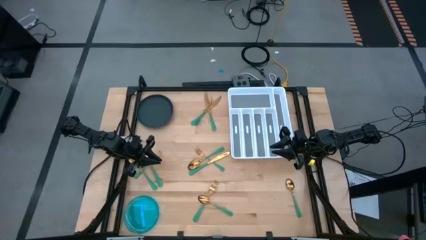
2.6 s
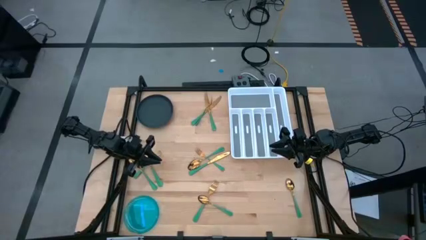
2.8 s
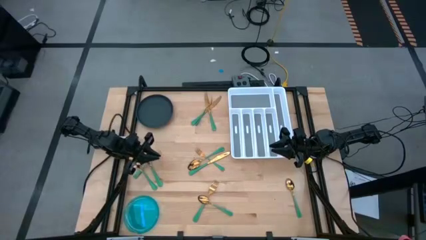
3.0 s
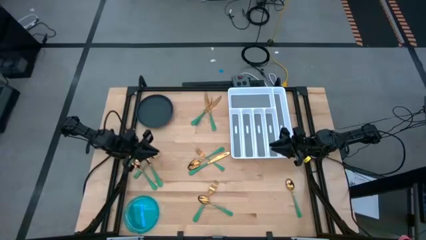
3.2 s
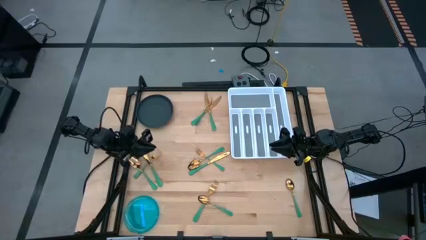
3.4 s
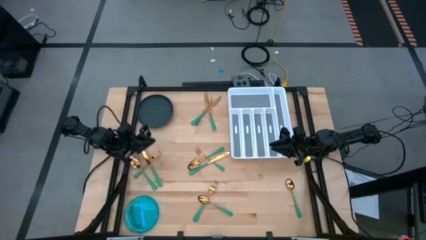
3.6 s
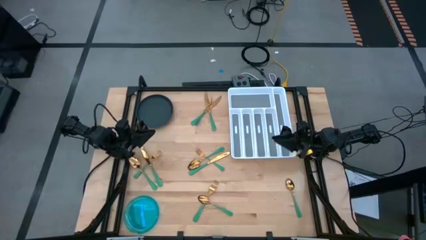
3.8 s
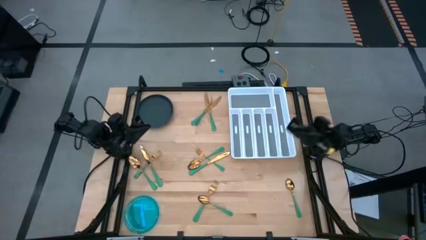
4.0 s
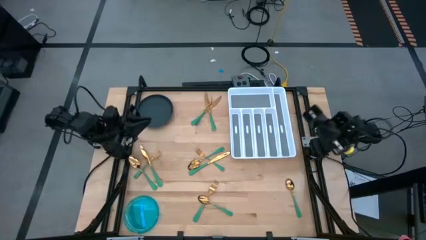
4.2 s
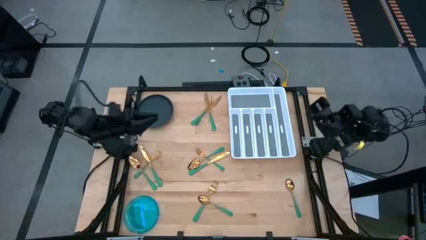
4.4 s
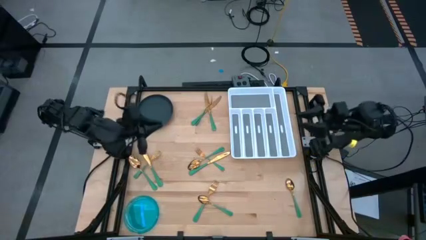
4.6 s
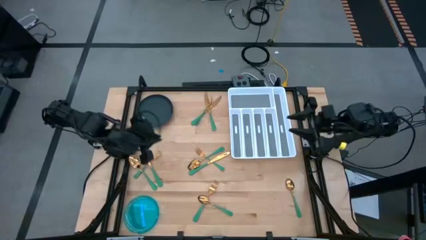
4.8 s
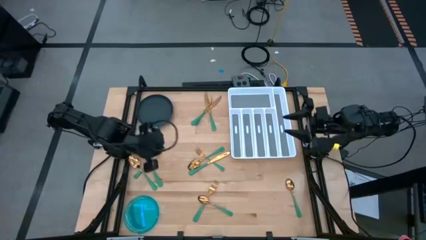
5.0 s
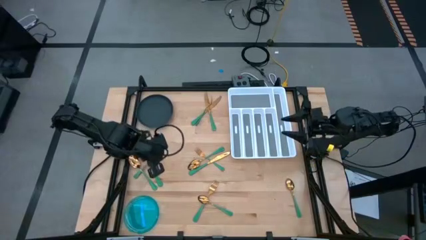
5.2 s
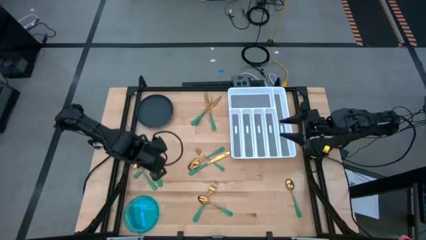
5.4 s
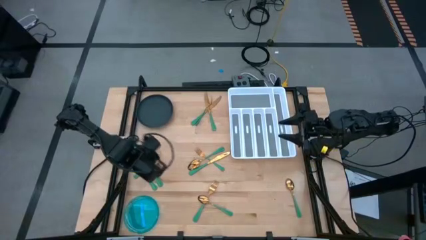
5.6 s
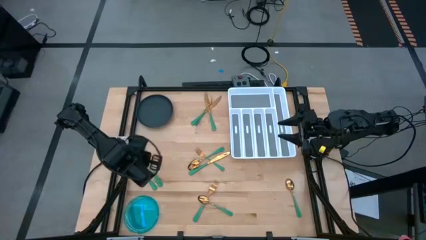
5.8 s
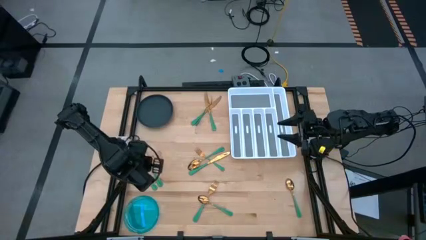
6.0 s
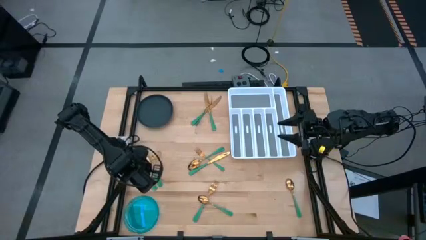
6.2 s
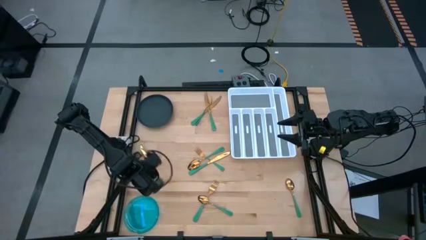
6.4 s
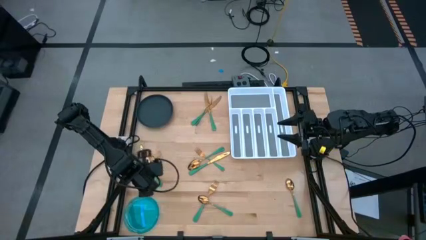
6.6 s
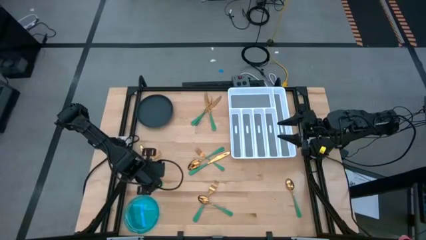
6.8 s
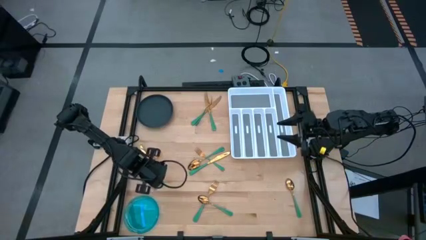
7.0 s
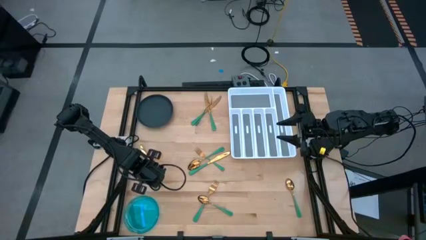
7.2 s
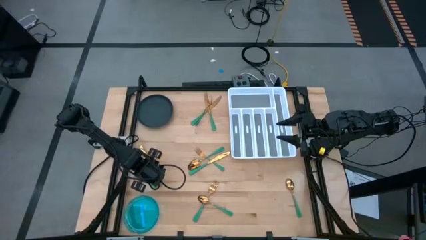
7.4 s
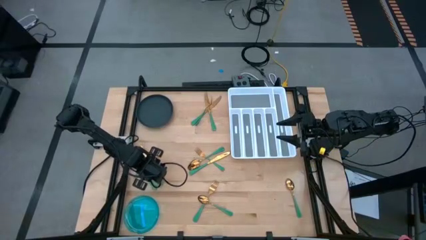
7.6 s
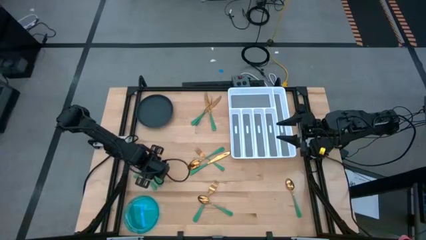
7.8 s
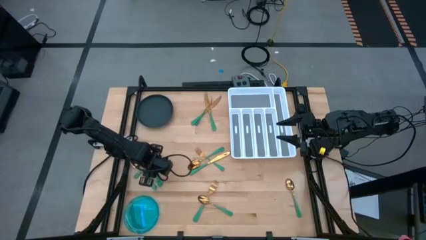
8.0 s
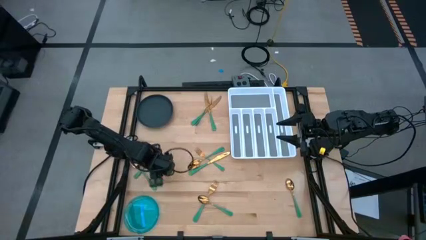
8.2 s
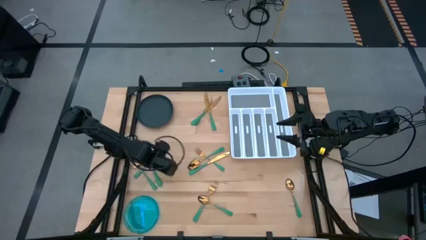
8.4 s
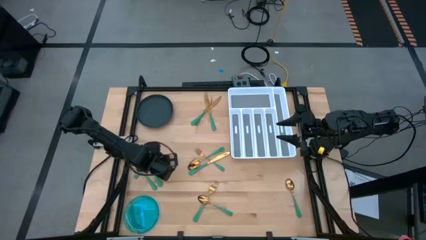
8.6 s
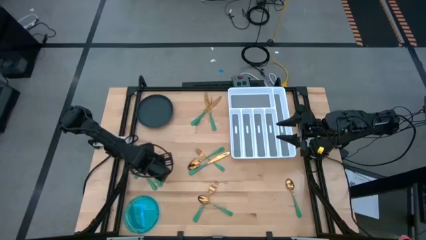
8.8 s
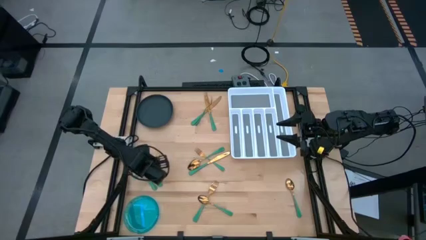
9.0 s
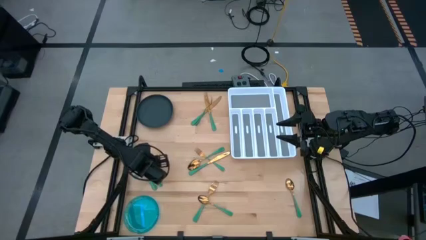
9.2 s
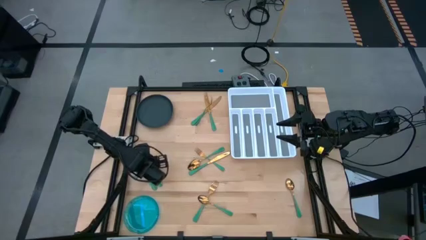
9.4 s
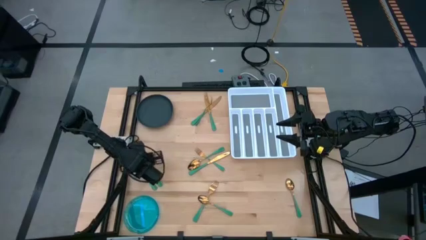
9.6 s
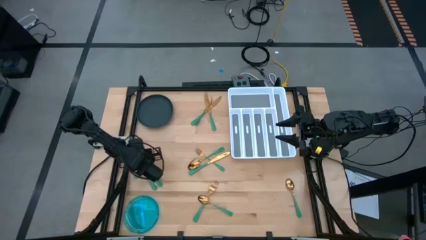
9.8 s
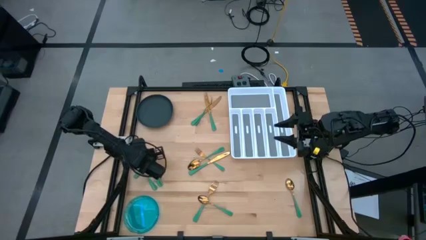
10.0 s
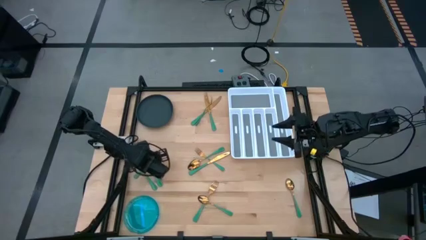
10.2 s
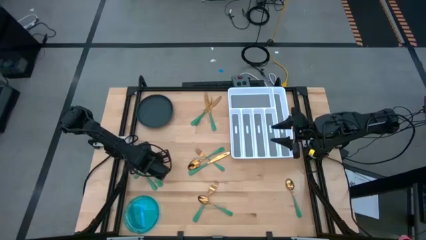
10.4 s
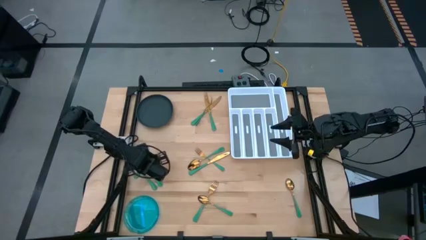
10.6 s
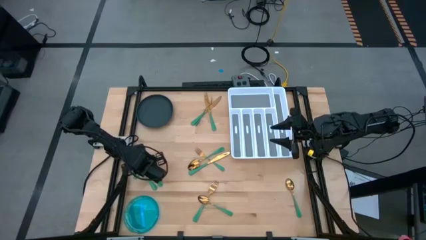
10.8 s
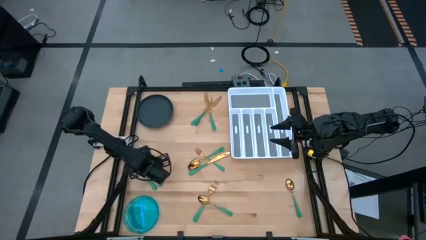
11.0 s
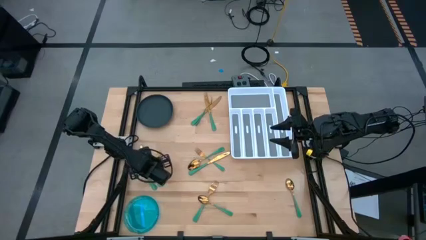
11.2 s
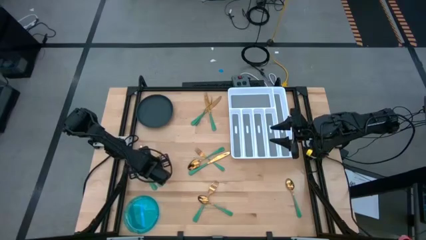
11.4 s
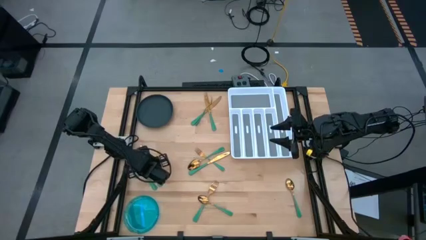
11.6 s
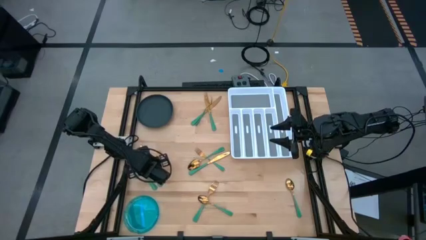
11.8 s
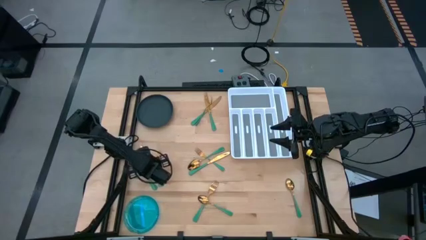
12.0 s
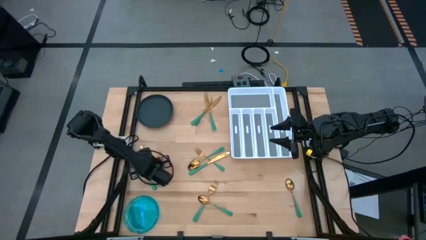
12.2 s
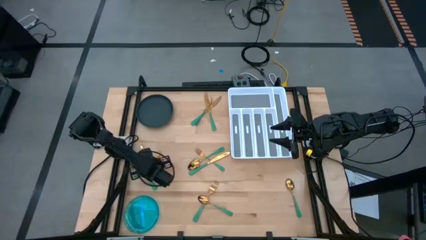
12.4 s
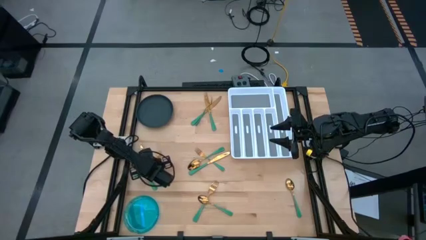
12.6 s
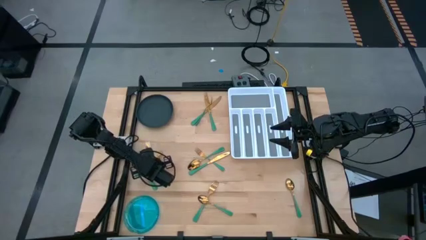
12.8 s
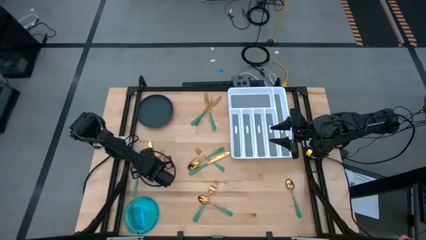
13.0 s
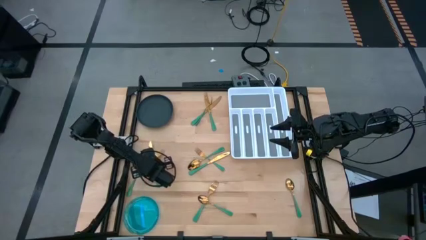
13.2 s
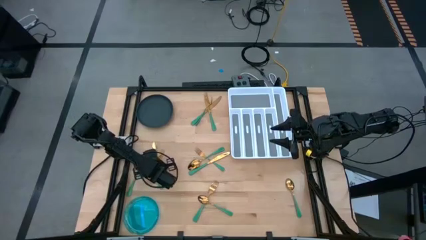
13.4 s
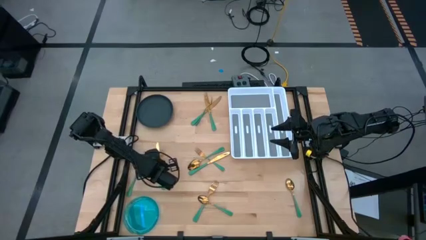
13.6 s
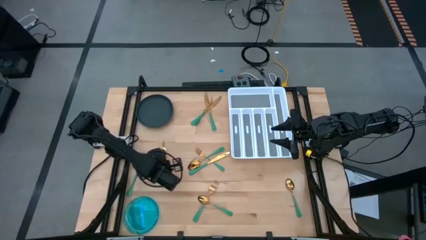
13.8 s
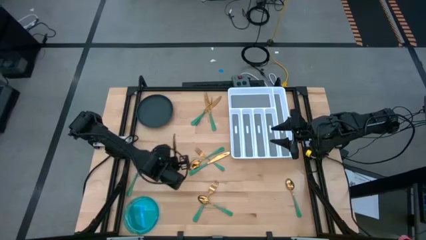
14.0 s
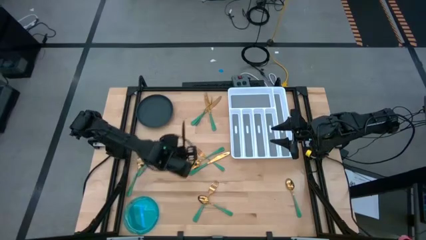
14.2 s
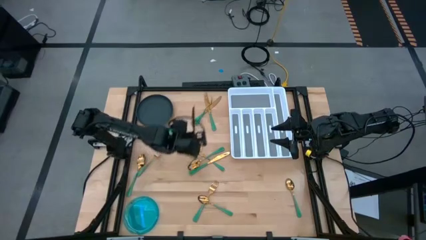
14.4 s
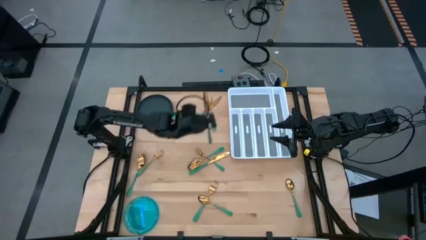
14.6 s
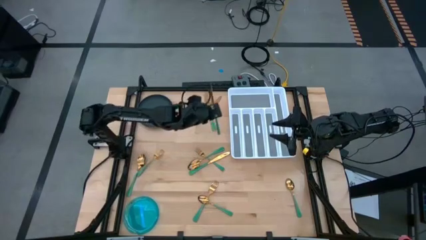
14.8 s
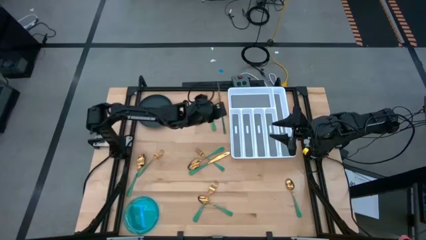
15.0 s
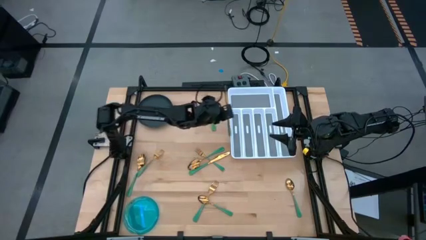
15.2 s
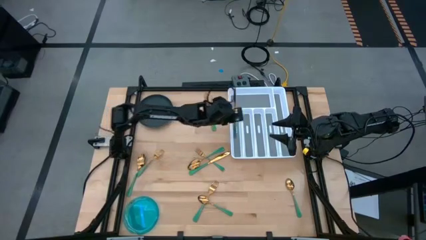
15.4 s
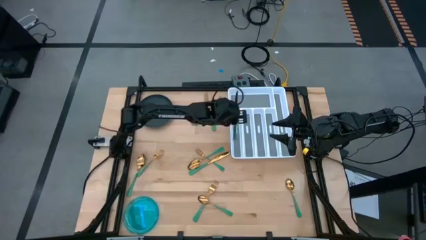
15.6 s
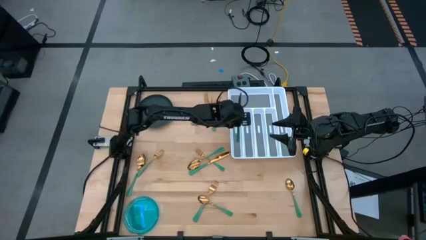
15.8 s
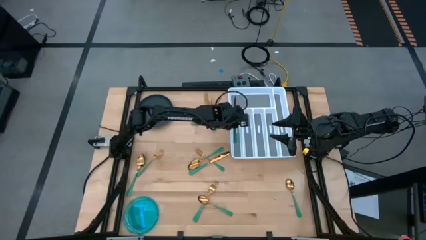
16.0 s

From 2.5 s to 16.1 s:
Task: Sort silverware
Put the green knife on the silverware organizer

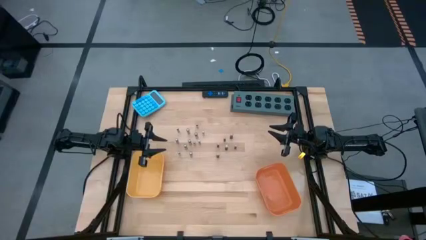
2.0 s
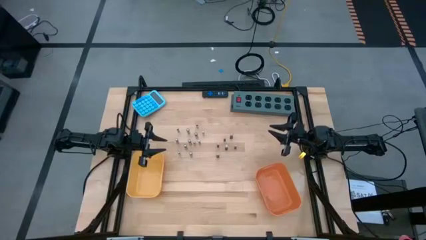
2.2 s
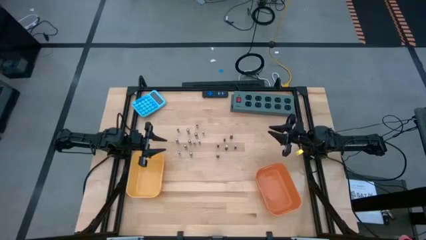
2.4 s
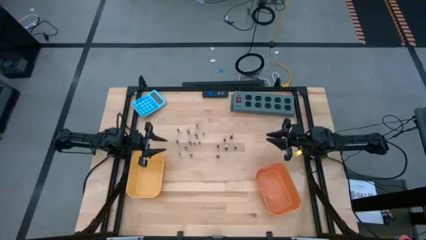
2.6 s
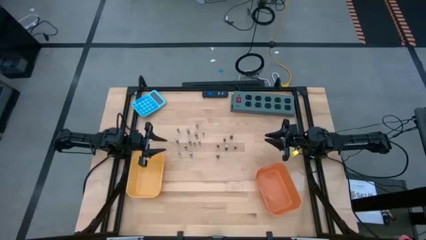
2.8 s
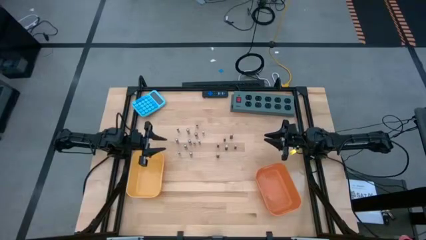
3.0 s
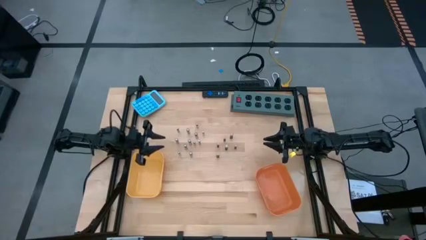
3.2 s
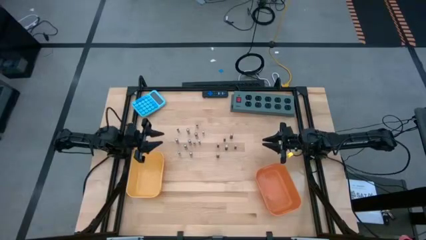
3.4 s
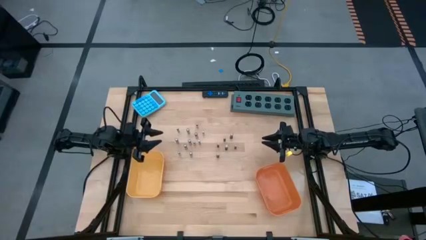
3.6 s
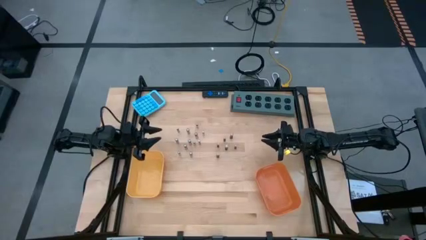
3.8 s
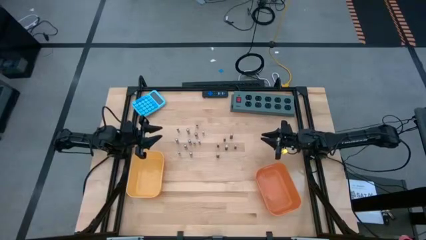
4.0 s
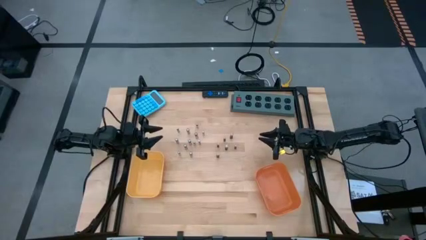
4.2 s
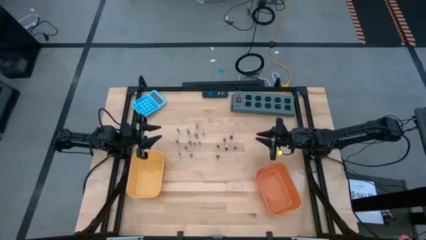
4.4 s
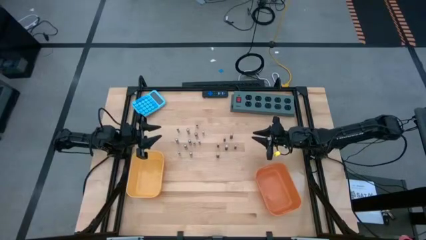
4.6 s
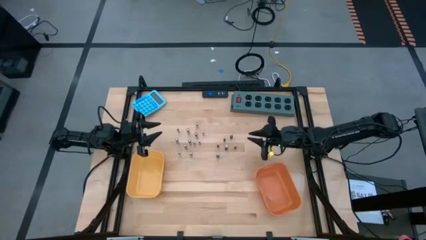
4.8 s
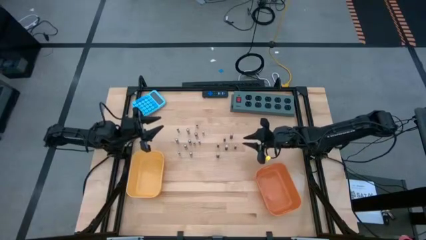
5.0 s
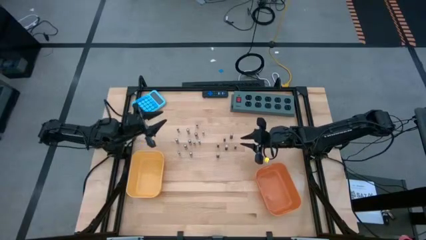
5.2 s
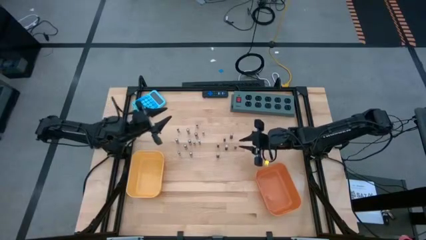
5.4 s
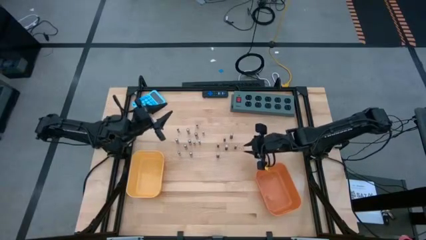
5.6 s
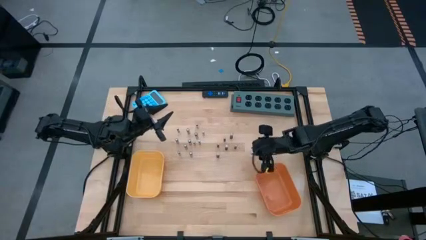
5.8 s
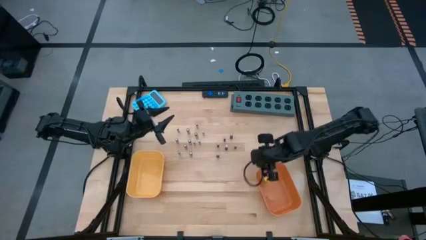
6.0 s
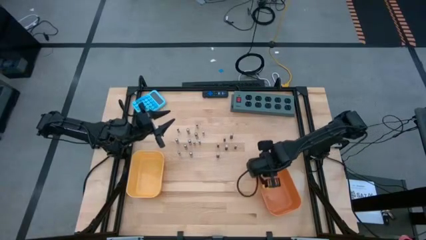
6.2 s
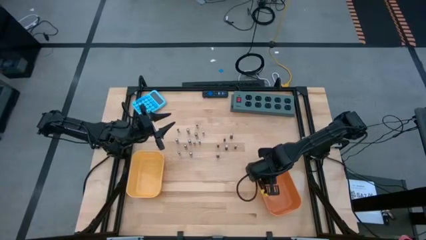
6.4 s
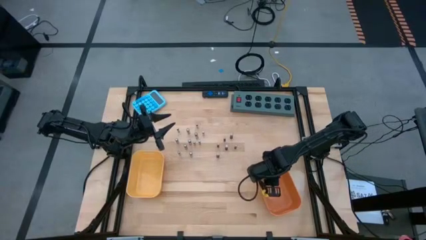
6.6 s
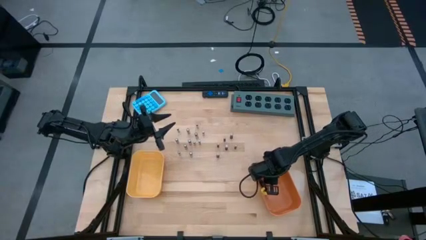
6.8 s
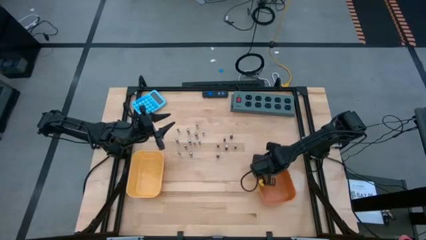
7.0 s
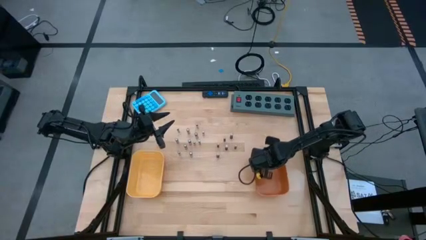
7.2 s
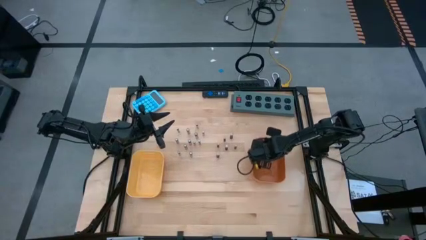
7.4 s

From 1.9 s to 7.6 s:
Task: Sort batteries
Move the orange bin to the middle right of the table
